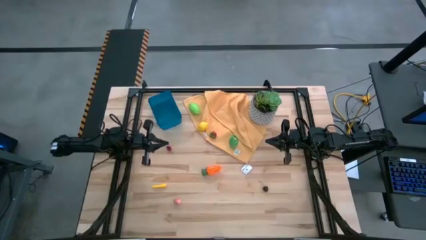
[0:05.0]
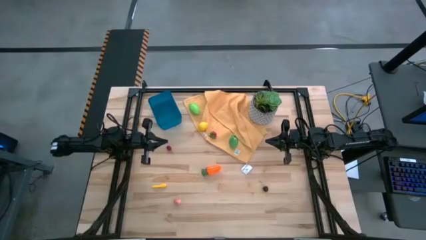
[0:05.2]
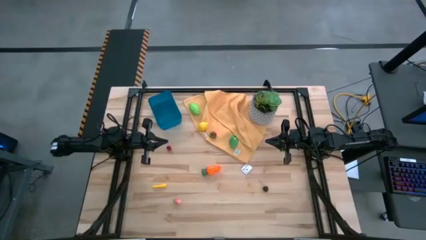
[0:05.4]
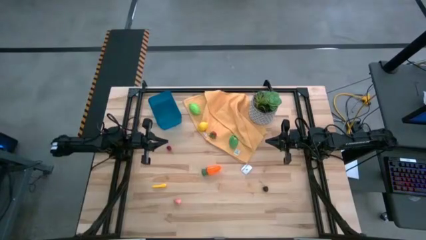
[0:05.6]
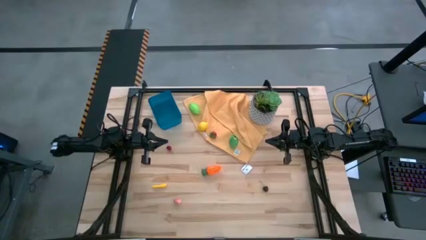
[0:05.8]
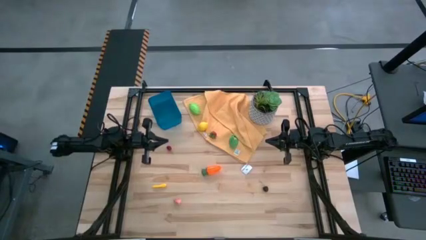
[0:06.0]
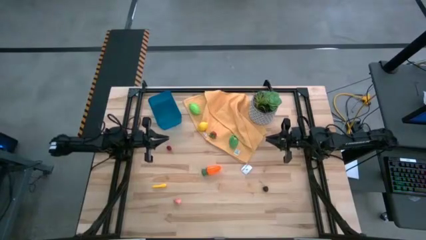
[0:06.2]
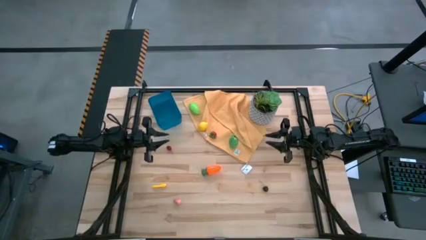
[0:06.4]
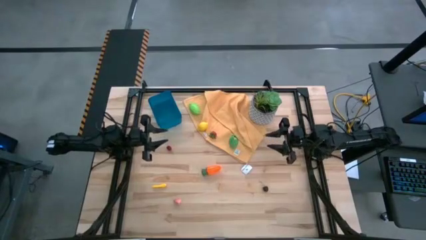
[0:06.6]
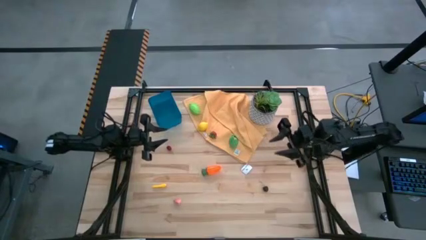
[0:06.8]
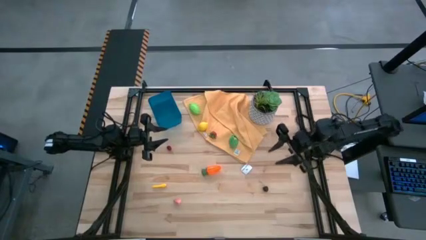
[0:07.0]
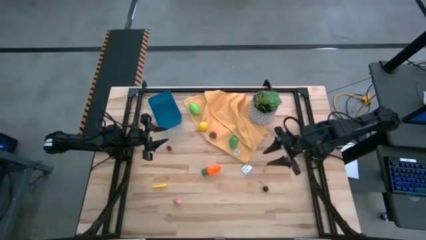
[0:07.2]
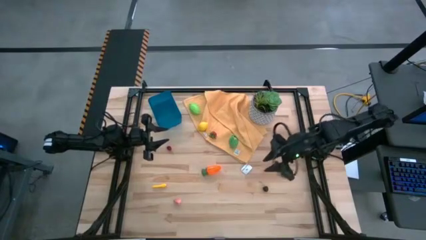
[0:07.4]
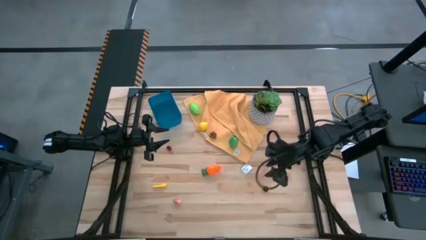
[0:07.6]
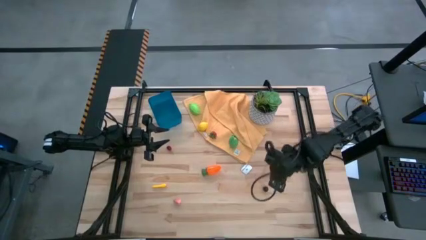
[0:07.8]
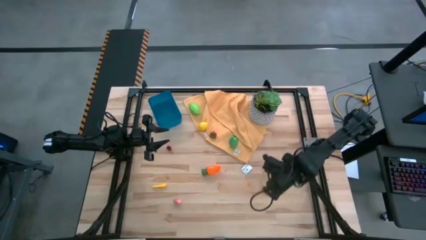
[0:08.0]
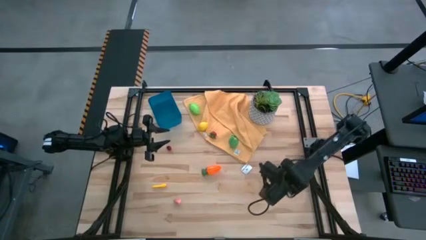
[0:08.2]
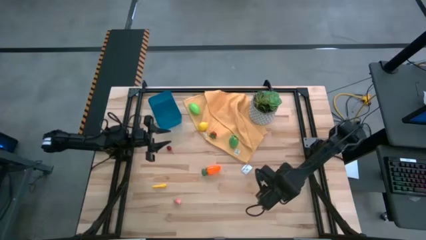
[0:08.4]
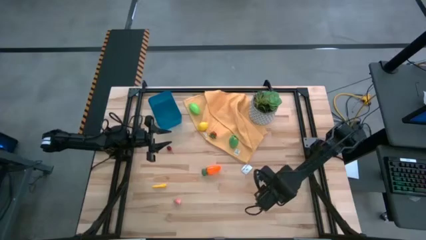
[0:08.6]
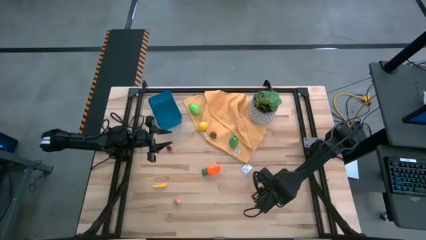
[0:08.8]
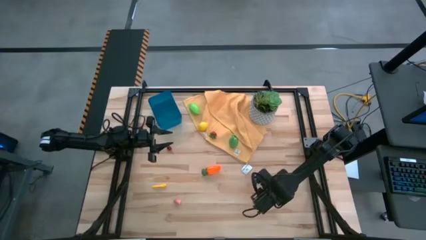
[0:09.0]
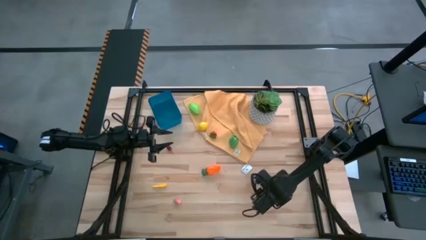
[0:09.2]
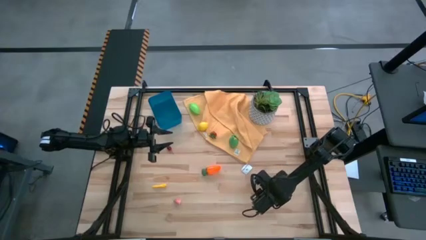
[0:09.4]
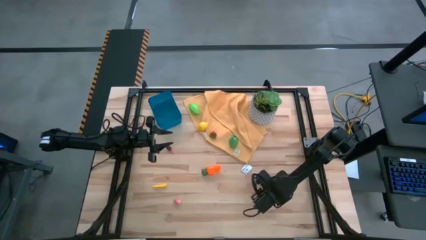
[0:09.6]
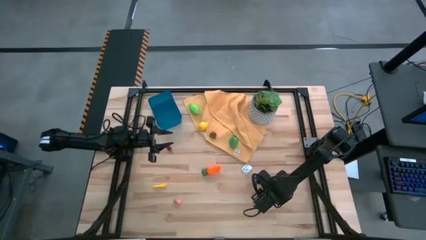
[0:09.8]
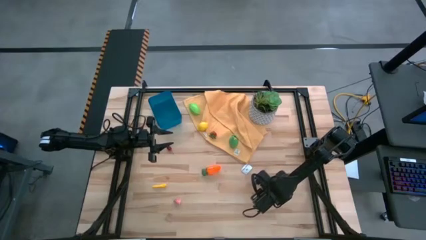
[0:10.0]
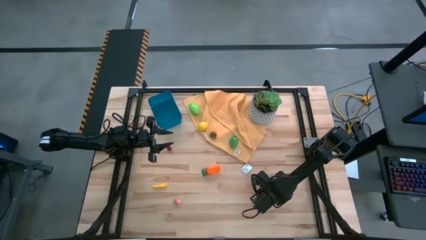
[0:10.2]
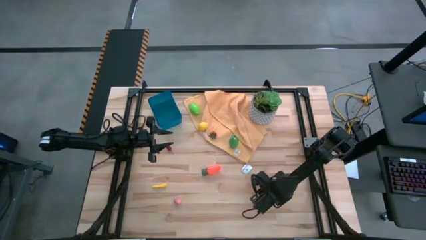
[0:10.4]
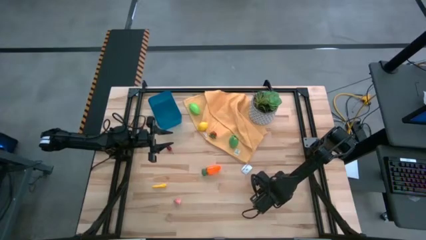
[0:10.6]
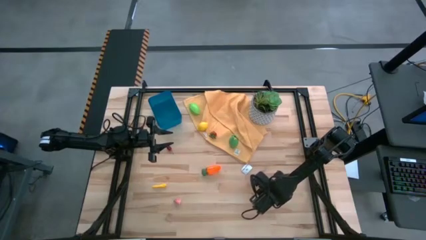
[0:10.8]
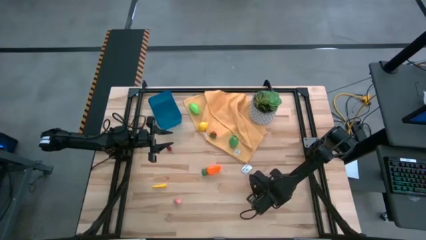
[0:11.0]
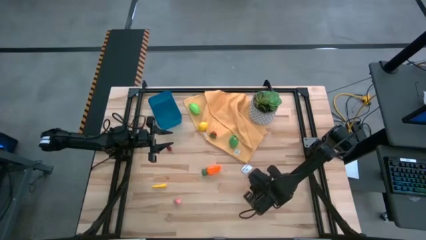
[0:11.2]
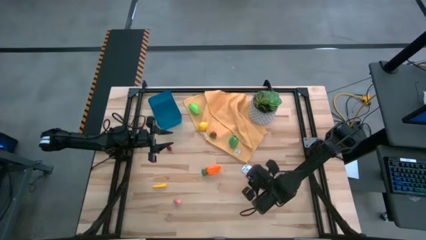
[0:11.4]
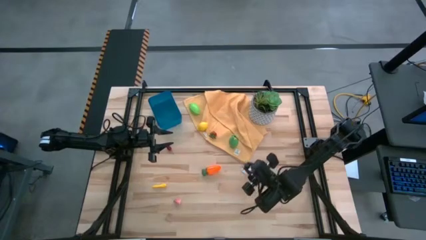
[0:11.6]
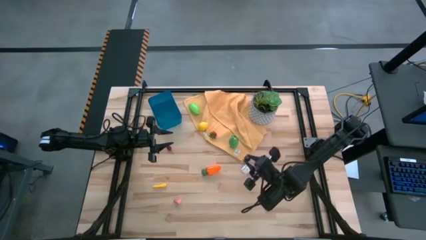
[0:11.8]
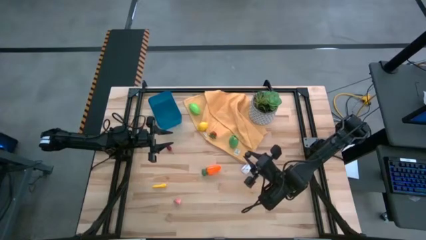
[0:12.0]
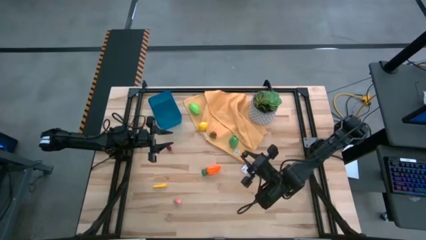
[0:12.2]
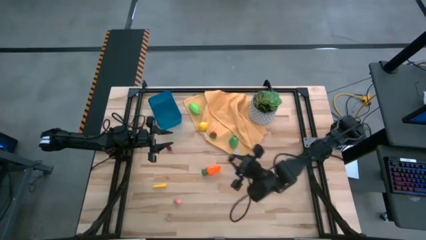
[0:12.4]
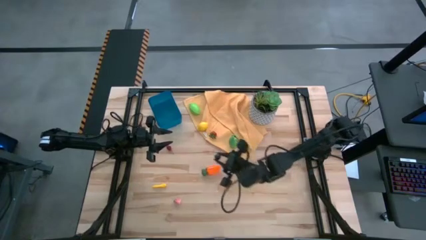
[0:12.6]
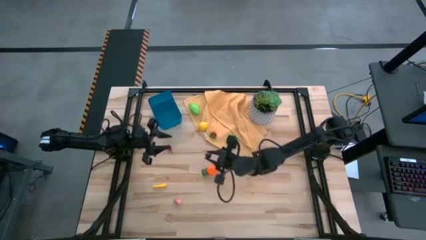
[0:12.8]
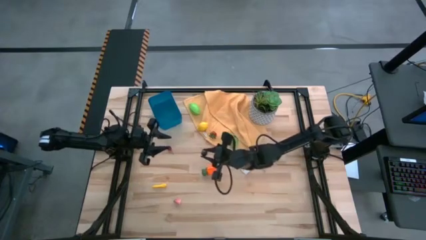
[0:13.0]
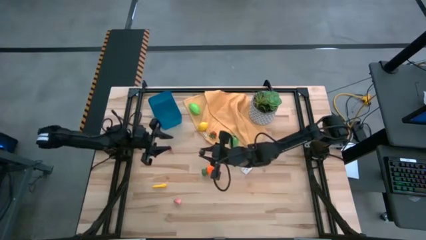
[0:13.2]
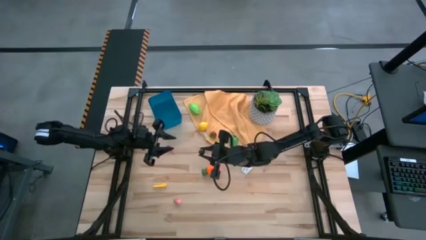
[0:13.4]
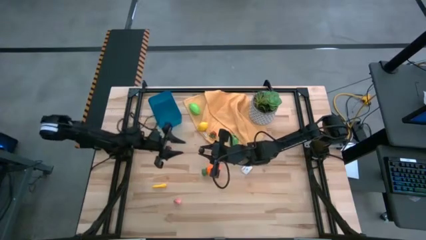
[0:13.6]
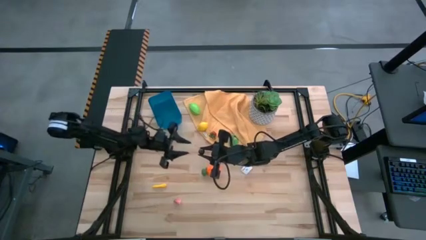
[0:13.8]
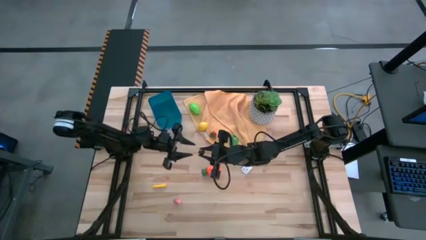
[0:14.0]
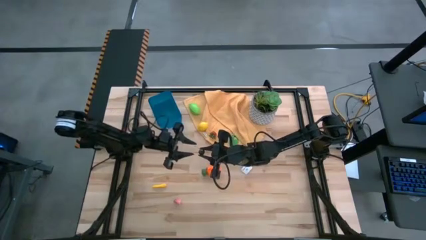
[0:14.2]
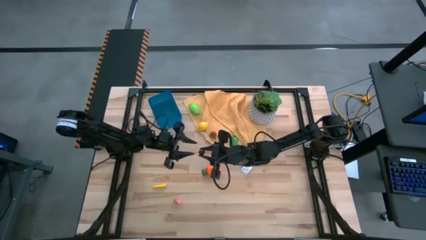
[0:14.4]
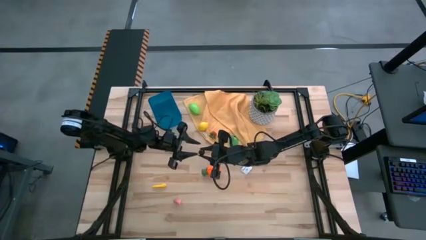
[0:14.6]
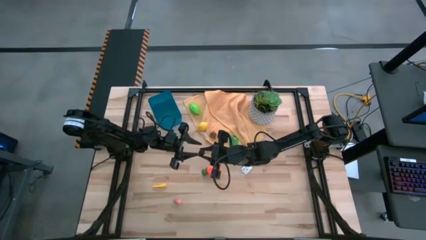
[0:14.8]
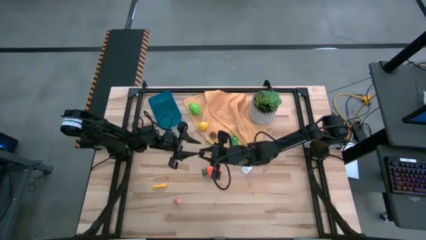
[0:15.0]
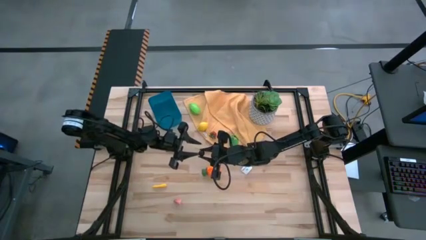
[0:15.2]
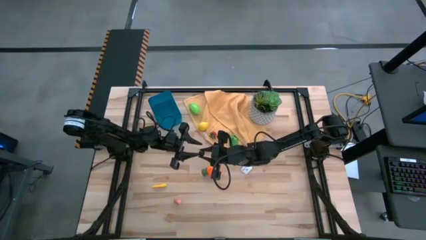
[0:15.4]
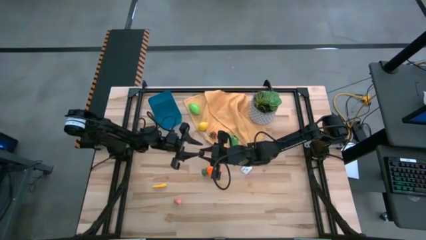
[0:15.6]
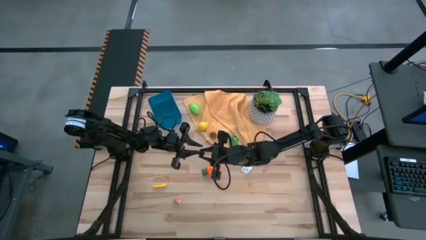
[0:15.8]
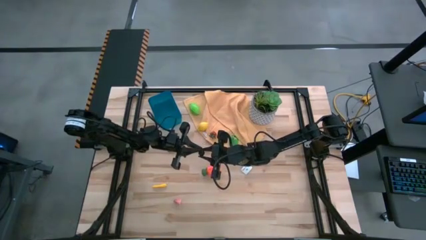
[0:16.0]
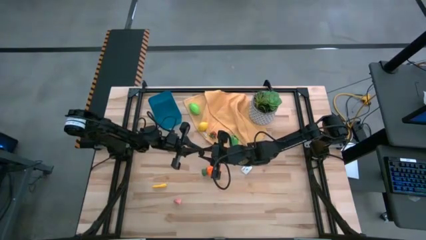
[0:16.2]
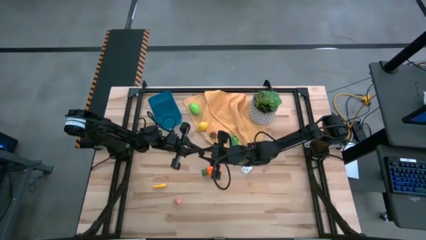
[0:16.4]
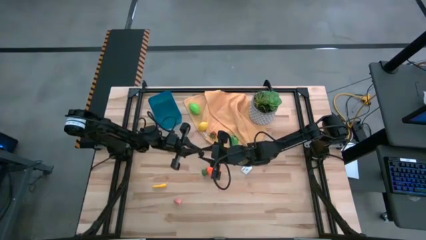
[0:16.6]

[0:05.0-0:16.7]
Task: Pick and placing Produce into tupperware
Put the black cherry into the blue bin

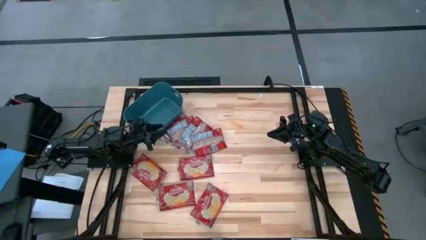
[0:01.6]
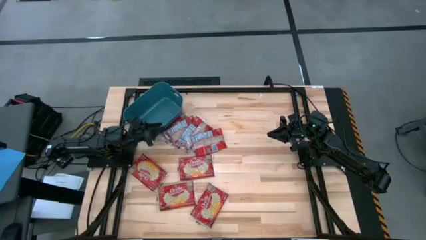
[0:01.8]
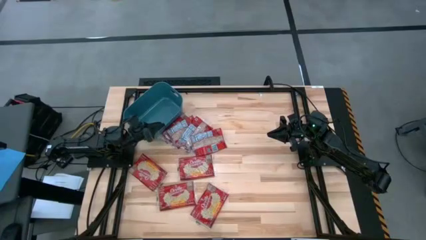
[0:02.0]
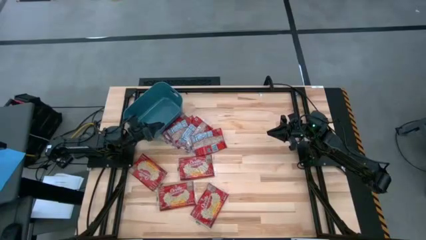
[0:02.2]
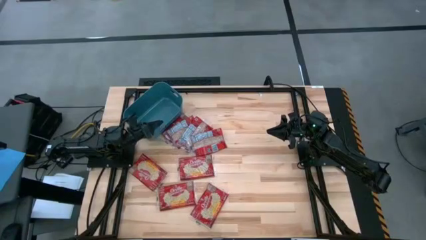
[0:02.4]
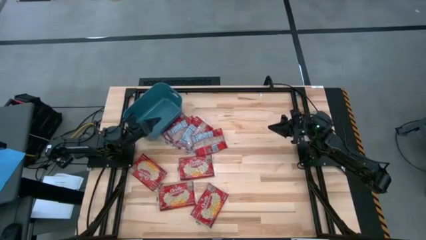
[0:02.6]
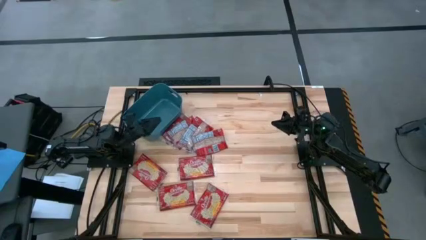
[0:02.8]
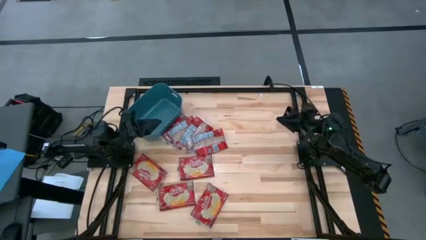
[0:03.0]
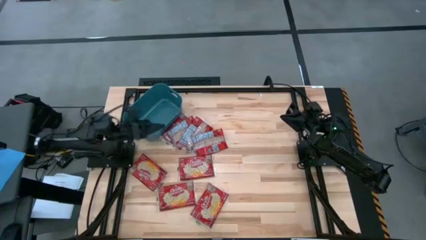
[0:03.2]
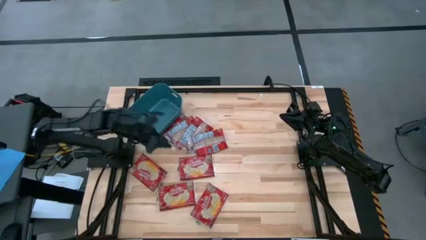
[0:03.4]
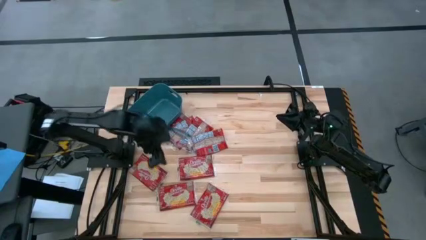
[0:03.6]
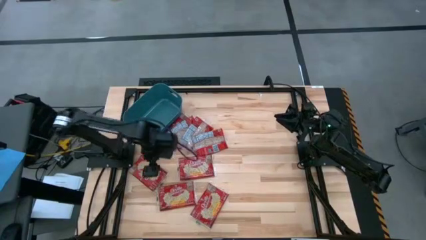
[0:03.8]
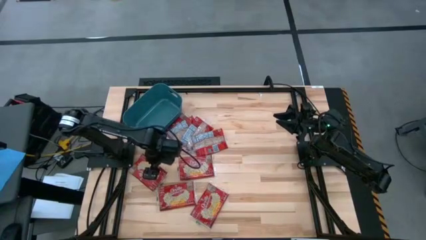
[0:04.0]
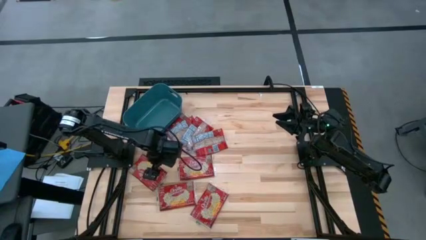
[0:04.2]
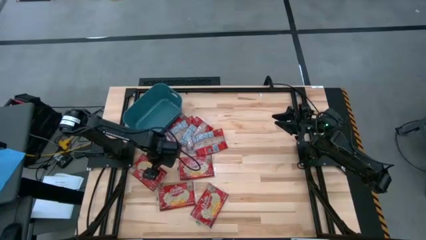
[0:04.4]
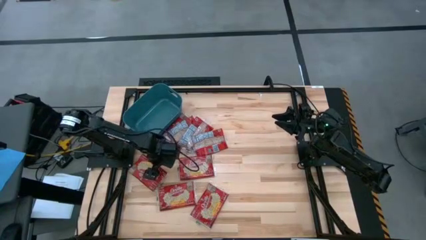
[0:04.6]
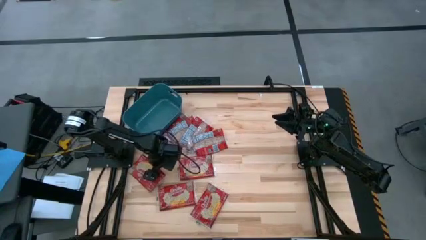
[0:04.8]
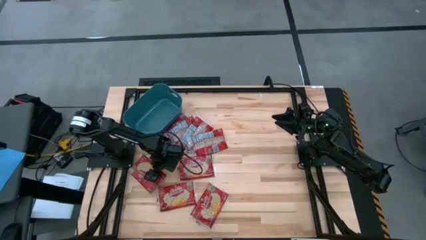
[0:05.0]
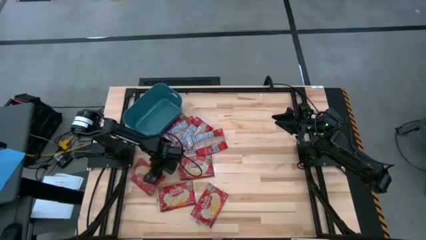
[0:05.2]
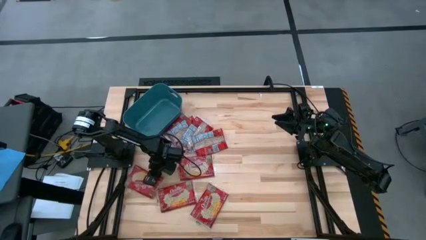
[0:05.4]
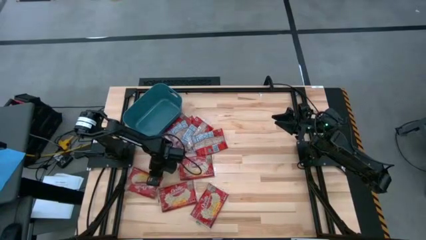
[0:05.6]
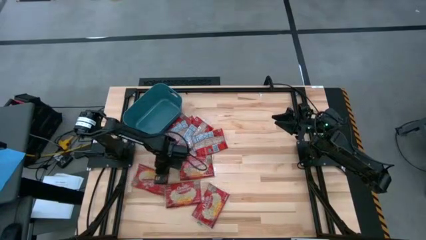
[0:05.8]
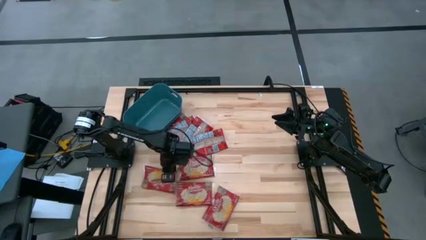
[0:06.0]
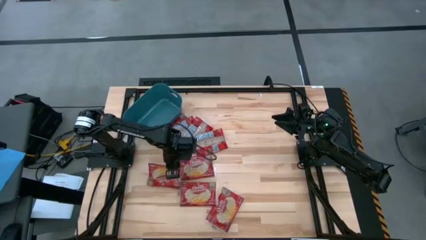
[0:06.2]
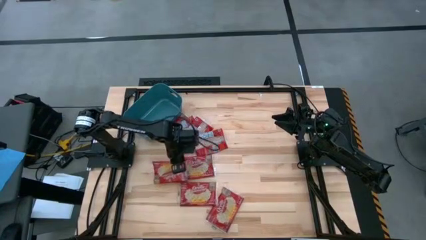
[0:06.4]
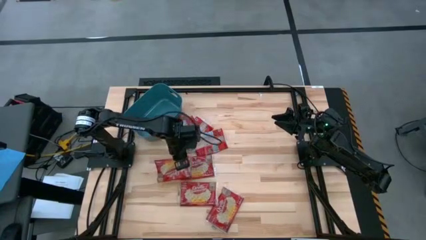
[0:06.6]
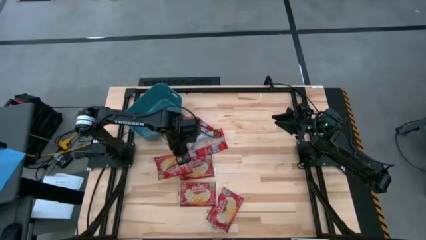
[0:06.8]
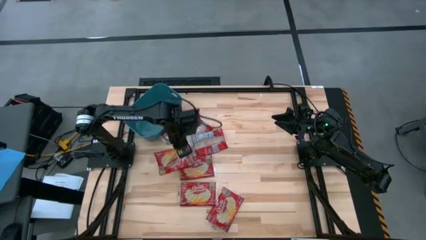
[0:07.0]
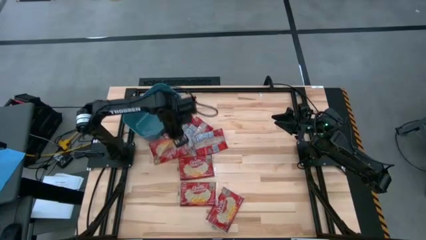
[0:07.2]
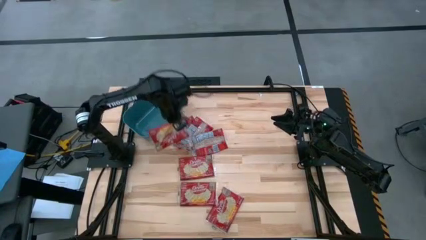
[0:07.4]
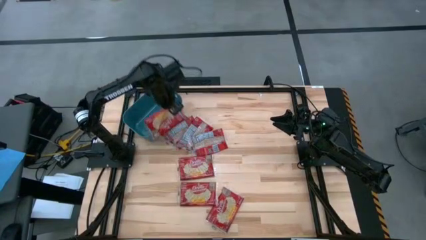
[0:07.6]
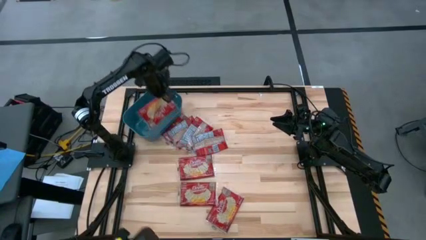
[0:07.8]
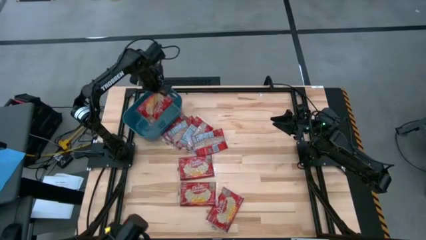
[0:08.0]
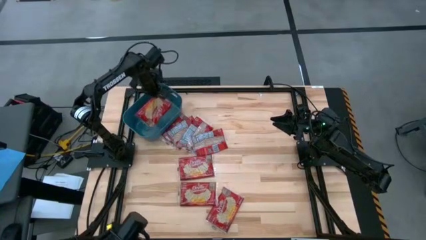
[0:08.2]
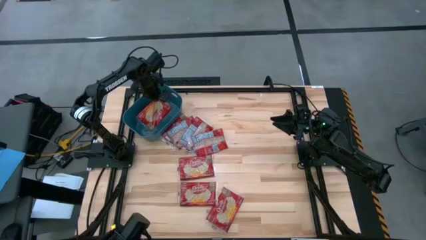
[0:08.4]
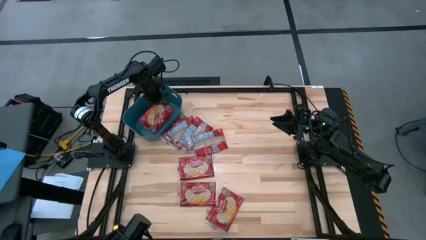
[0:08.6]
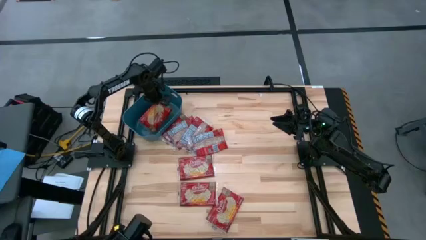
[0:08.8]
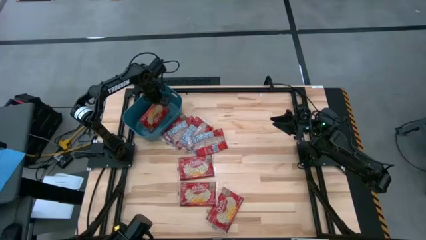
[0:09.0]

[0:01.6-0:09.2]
Task: Sort popcorn bags into baskets
Put the popcorn bag into the green bin
